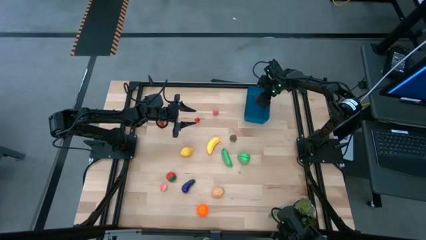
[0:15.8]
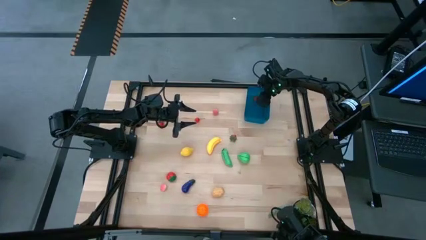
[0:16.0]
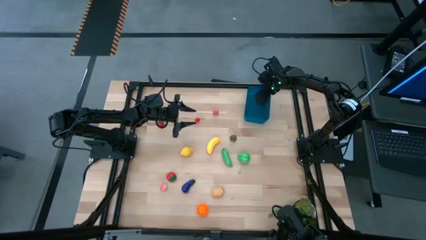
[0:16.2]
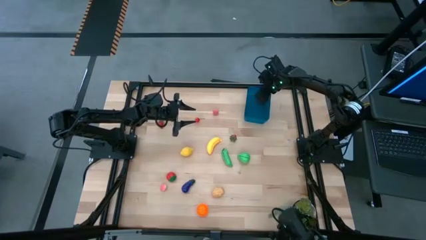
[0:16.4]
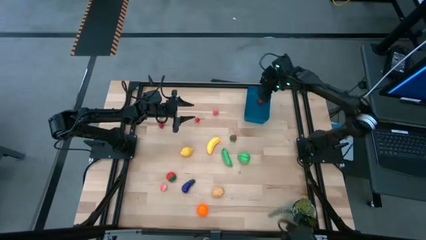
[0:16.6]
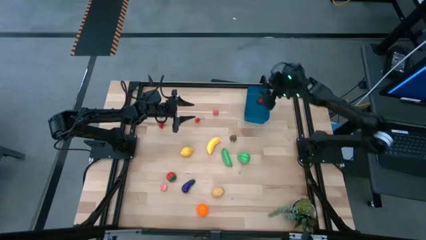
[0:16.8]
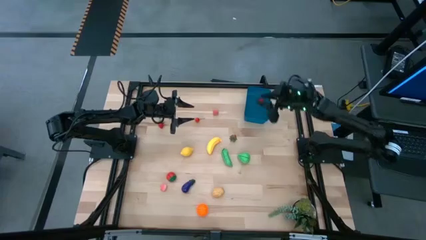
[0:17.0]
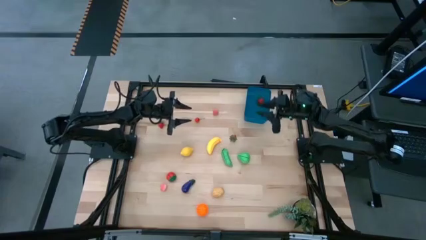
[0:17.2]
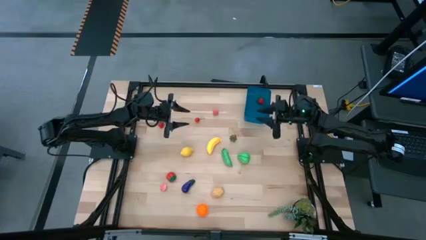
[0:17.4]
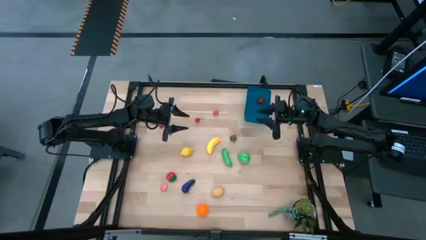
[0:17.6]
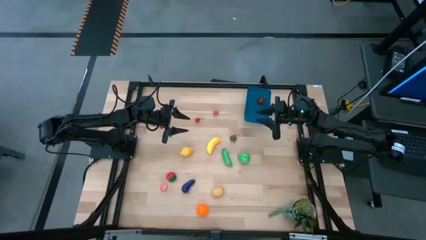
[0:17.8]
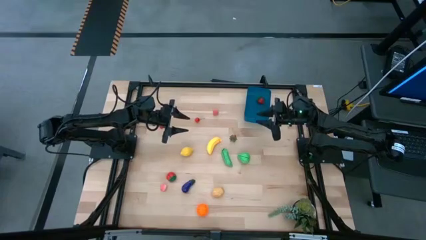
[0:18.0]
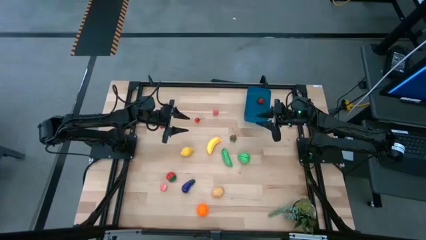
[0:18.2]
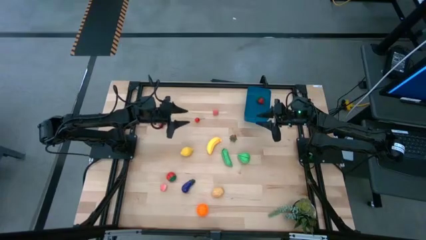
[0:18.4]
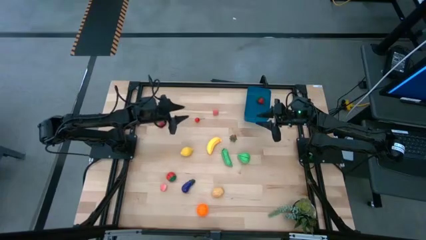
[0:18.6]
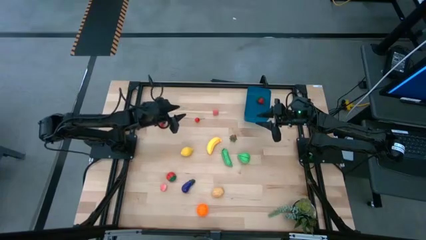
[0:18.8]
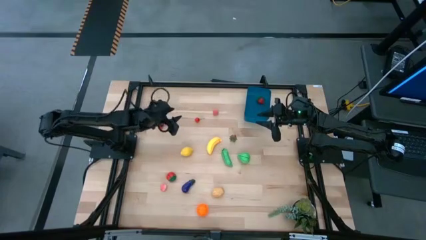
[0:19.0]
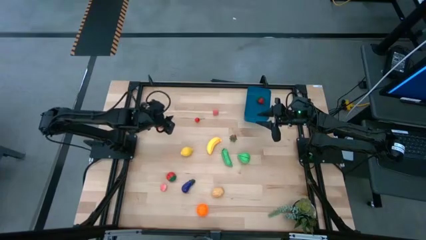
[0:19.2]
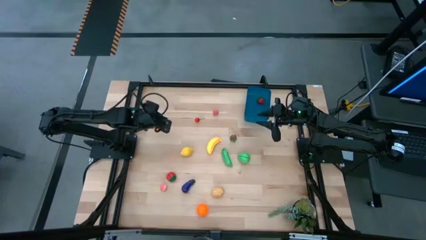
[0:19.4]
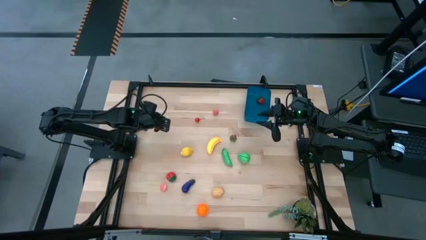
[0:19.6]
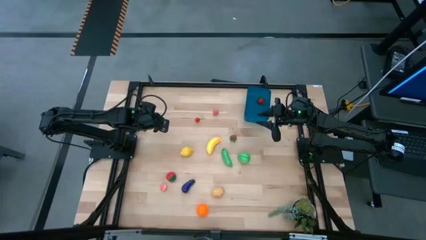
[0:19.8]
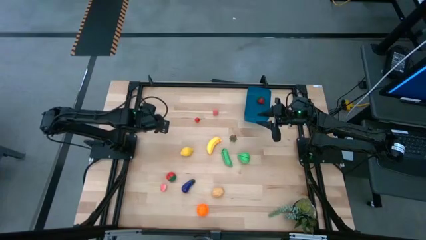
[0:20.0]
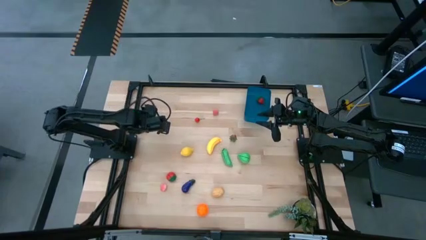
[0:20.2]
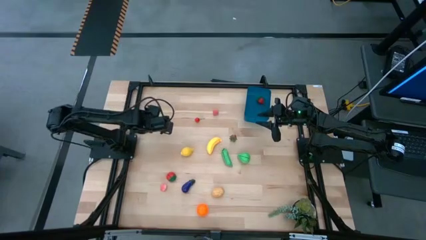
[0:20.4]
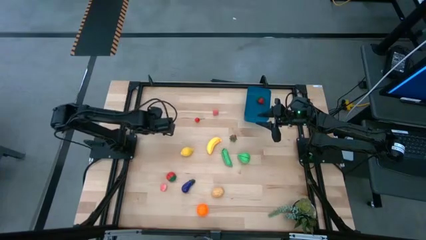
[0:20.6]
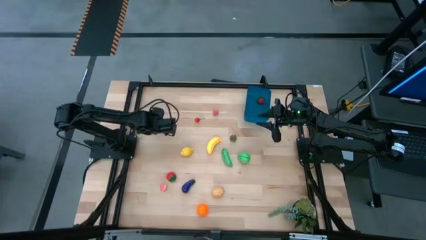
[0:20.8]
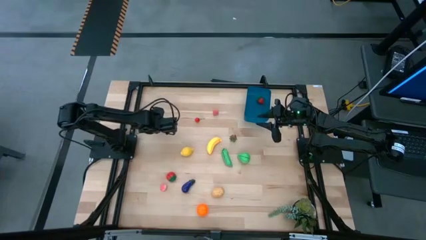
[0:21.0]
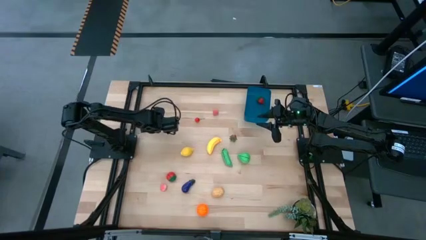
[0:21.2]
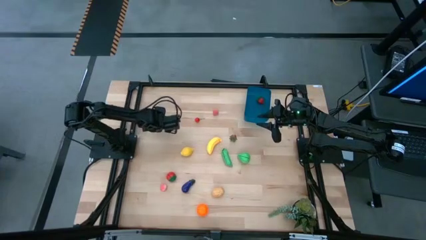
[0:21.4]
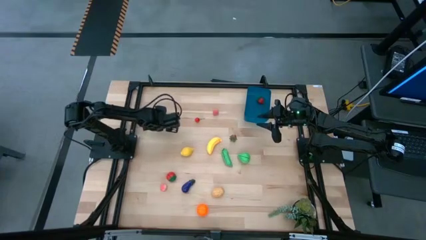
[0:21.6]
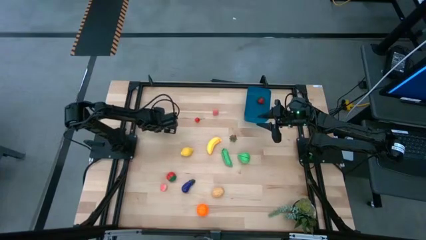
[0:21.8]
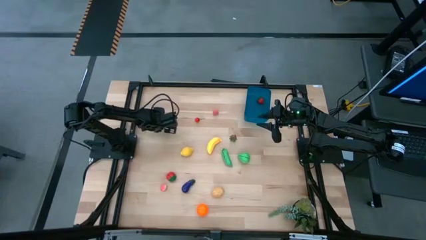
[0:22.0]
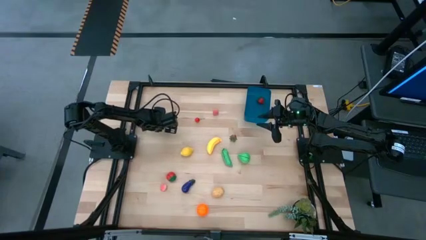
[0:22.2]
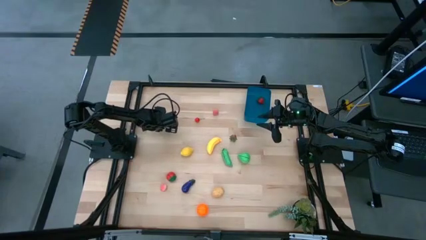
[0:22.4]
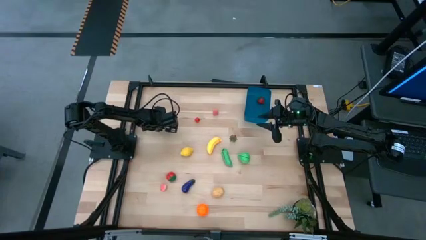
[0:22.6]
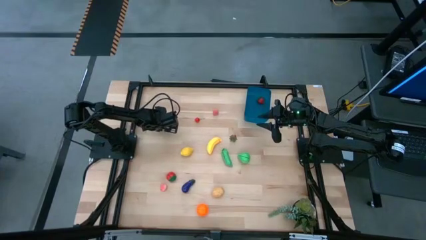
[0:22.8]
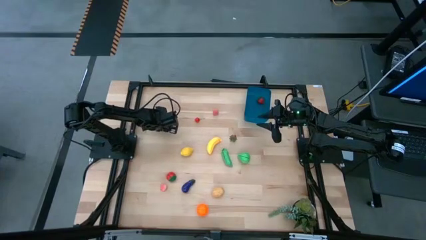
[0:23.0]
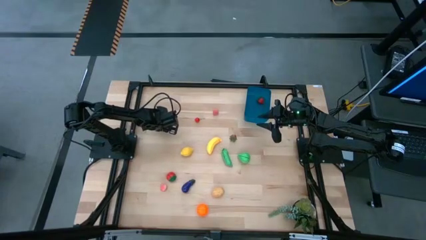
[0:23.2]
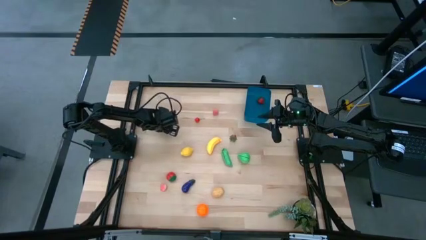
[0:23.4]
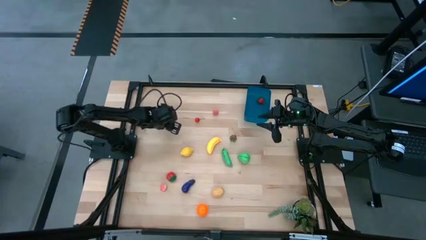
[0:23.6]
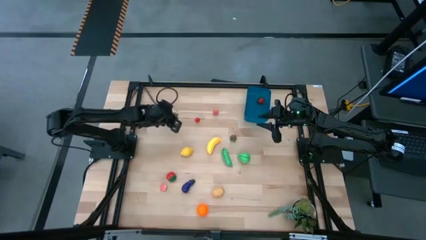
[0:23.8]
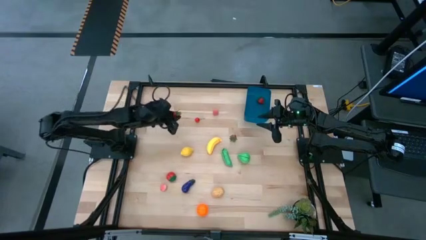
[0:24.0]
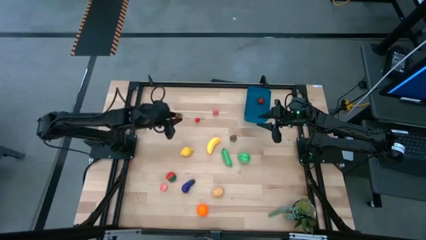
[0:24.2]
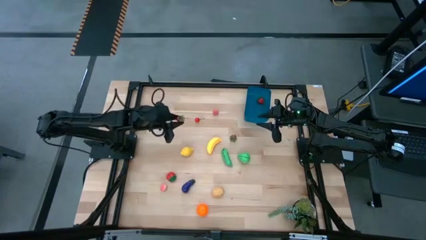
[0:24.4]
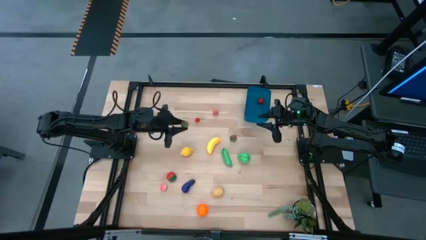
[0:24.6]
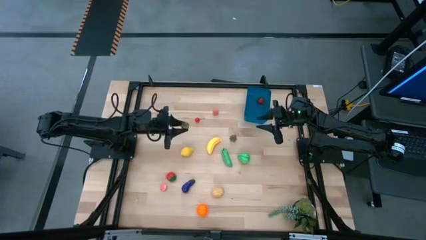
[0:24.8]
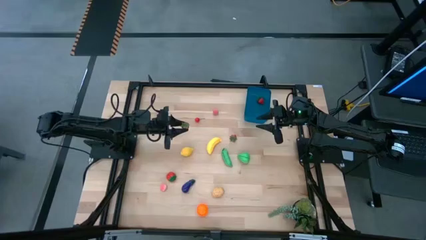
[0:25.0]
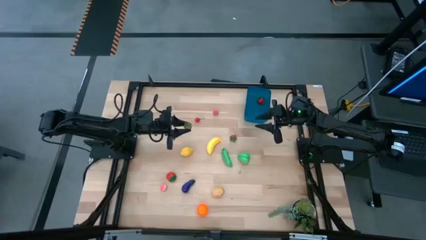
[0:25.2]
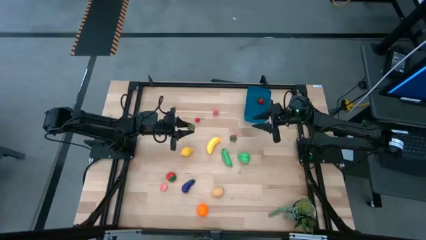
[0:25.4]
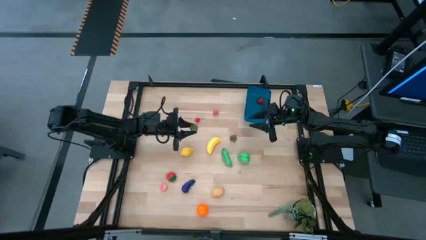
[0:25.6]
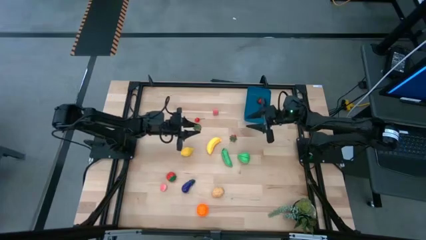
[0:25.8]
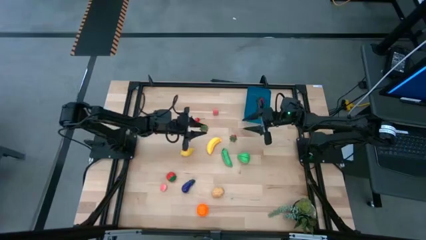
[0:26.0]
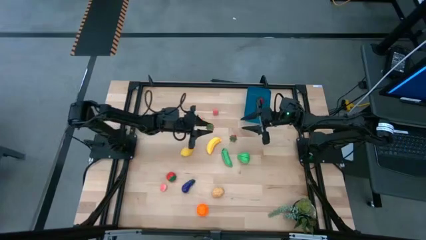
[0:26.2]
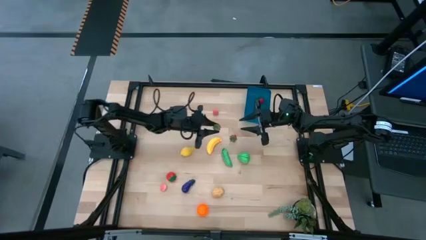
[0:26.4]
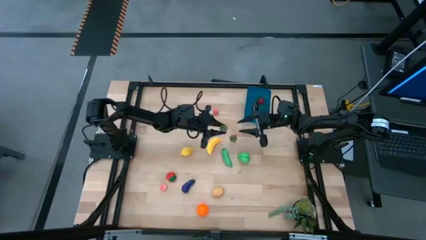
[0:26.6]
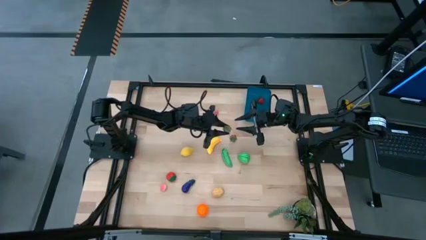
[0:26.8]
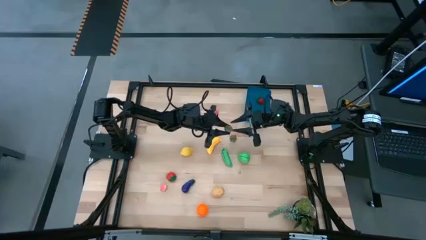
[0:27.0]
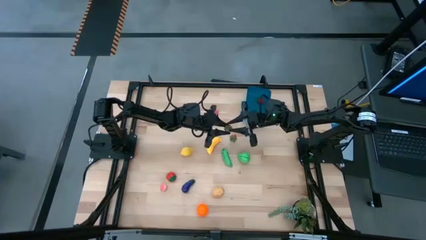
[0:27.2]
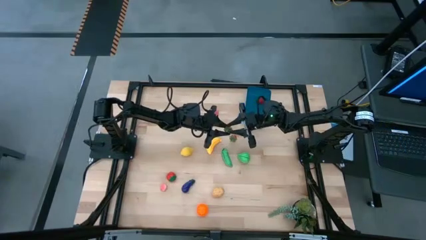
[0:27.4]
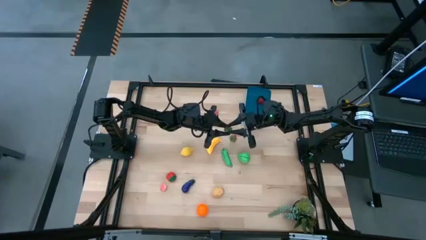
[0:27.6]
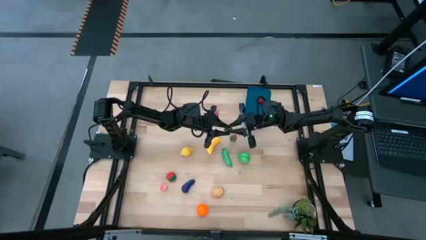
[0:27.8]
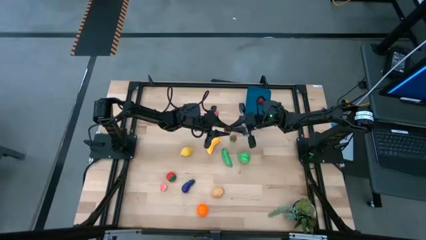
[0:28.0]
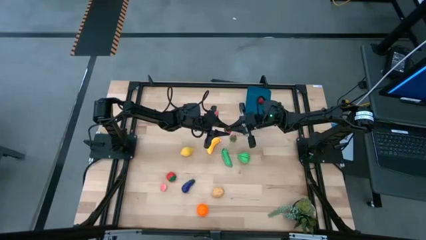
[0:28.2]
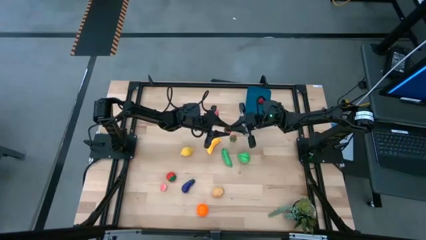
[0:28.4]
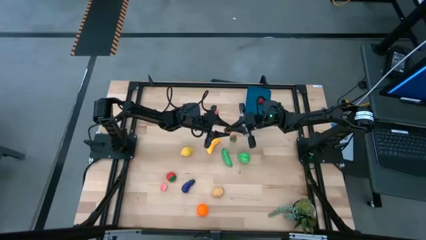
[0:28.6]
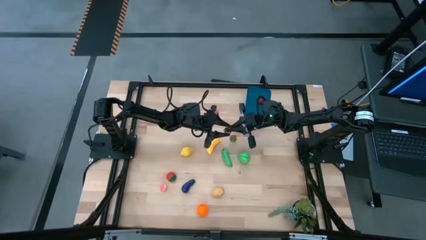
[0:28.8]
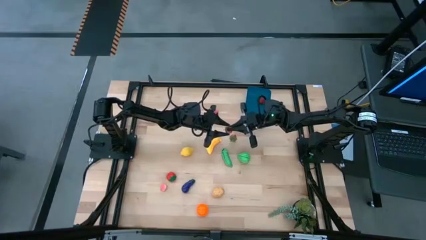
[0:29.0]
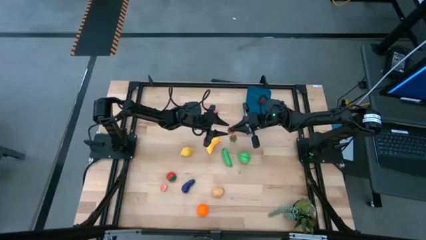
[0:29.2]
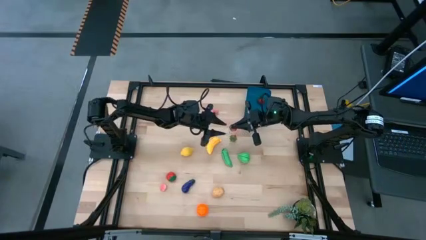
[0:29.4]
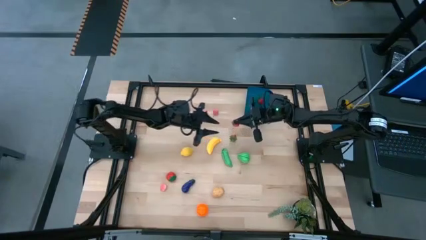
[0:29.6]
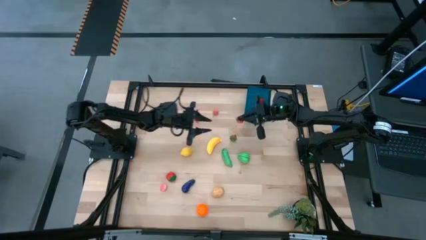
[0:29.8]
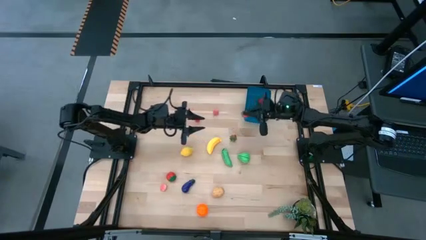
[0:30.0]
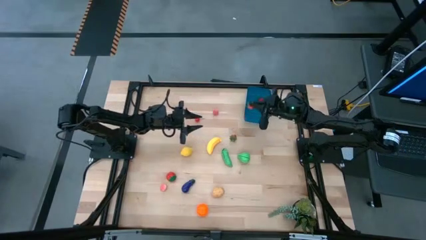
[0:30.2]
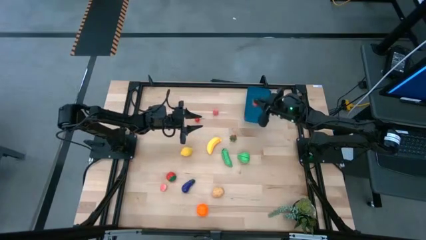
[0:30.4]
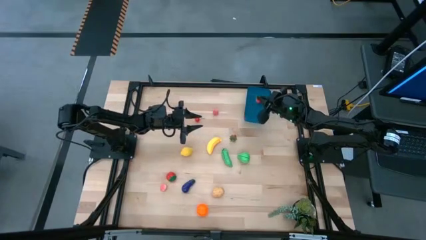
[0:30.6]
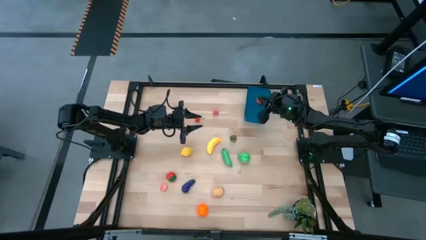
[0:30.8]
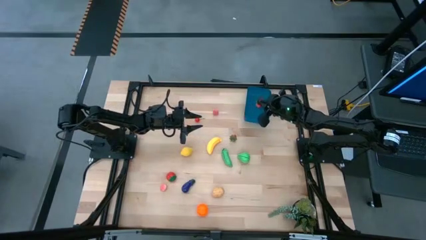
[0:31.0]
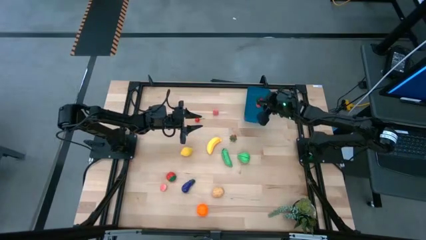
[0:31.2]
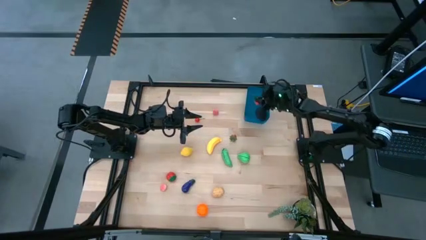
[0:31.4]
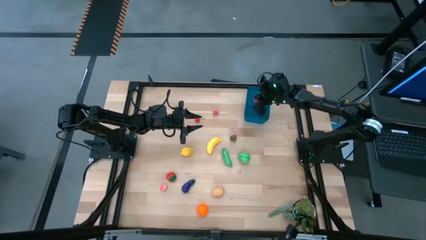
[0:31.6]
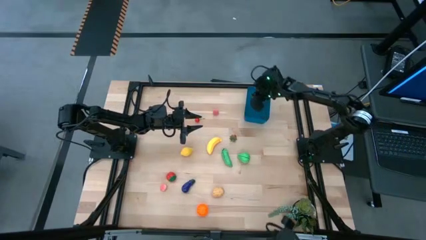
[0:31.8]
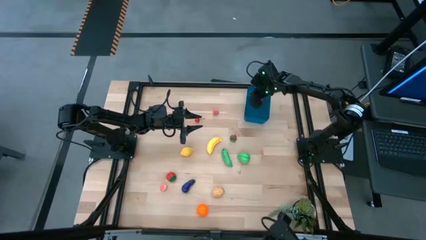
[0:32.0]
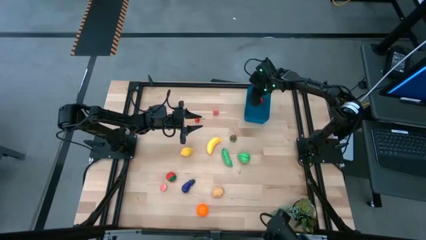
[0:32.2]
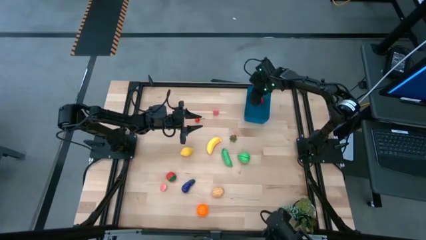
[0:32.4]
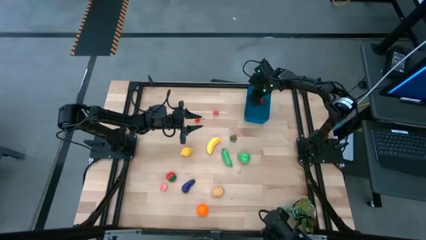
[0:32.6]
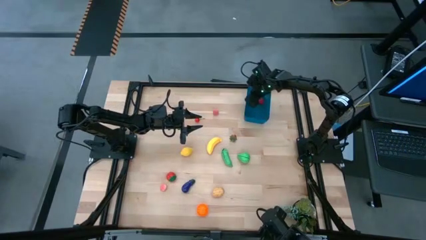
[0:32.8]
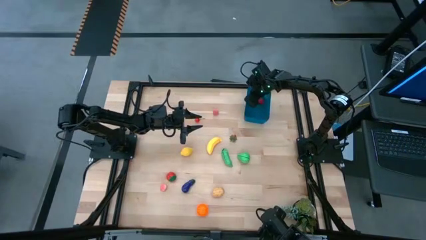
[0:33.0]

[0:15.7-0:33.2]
Task: Pick and placing Produce into tupperware
Put the red strawberry into the blue bin
